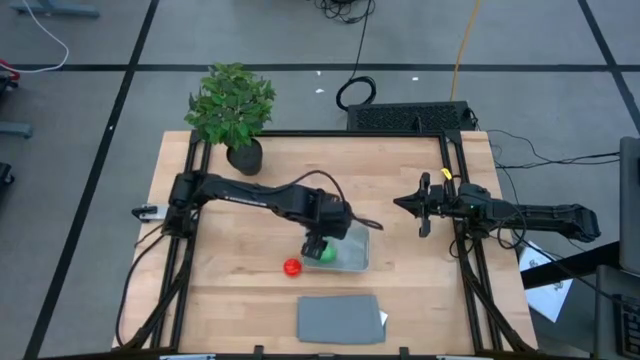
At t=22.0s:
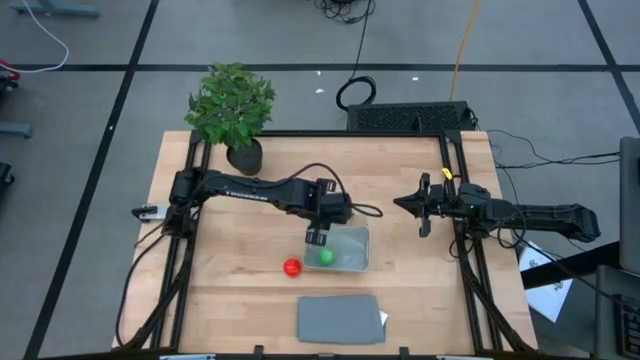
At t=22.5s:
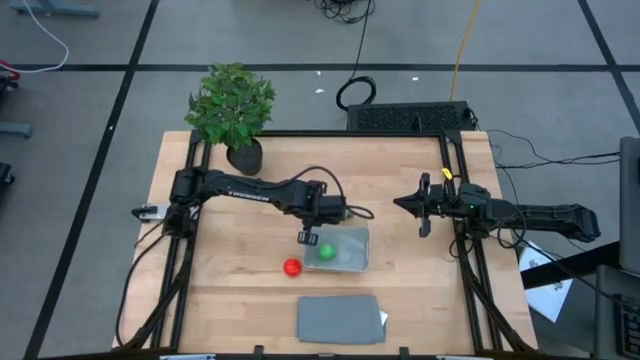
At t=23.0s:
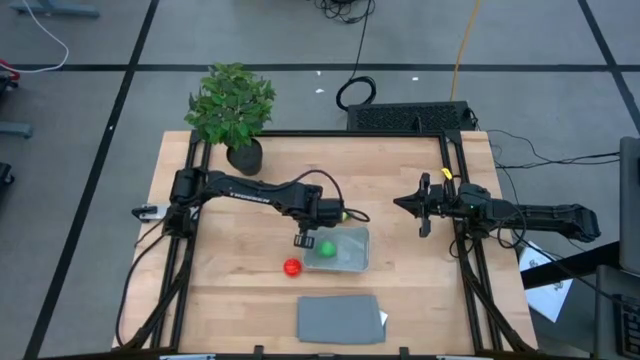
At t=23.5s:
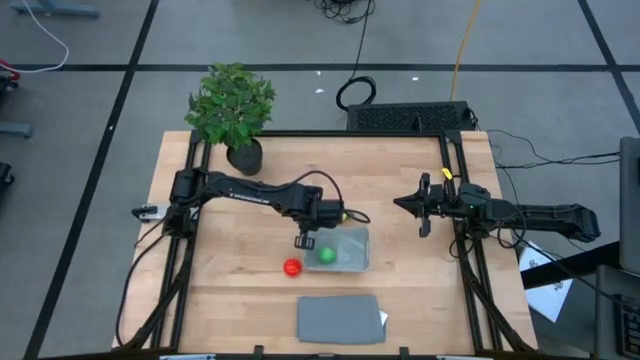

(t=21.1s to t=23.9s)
Task: Pick and placing Produce into tupperware
Adjust the gray bin

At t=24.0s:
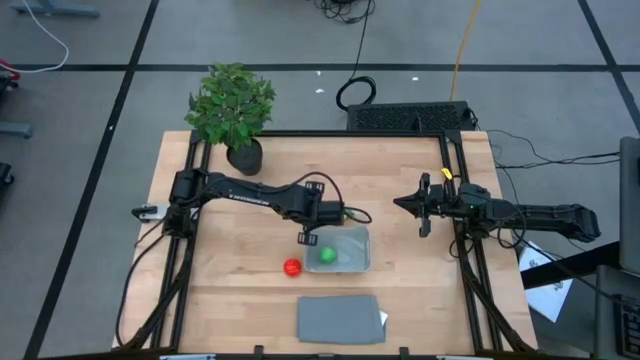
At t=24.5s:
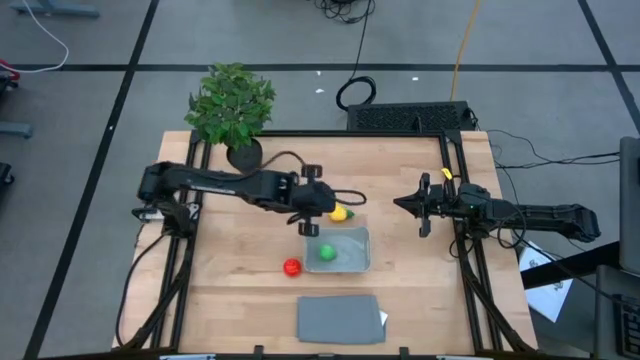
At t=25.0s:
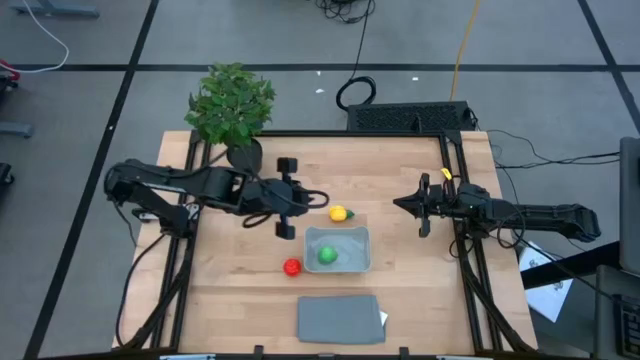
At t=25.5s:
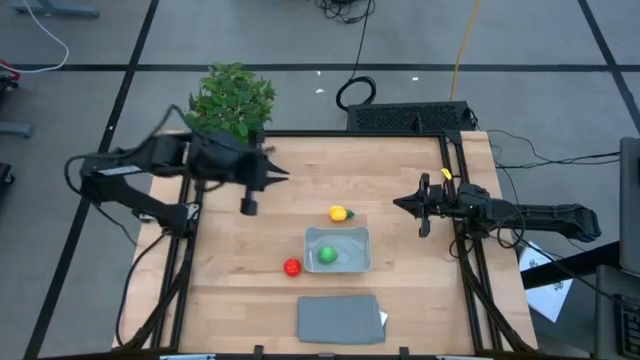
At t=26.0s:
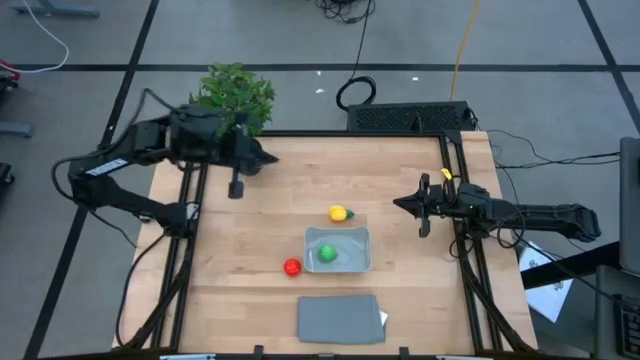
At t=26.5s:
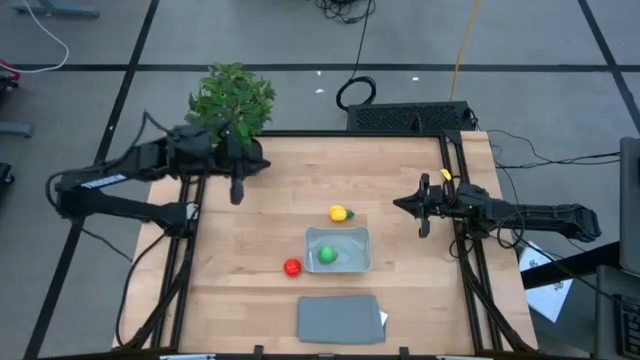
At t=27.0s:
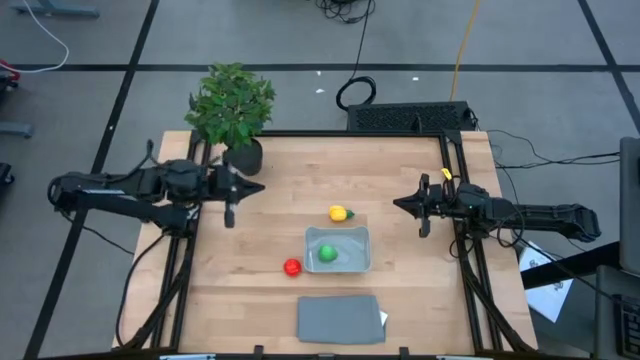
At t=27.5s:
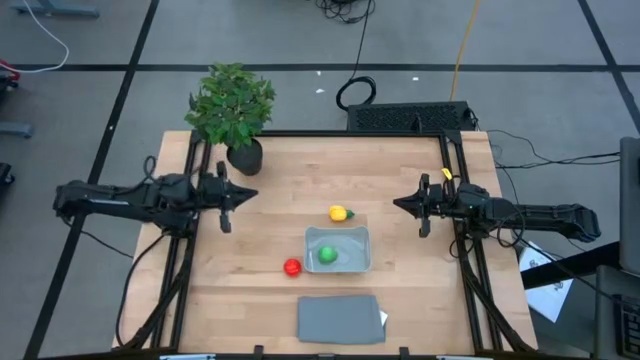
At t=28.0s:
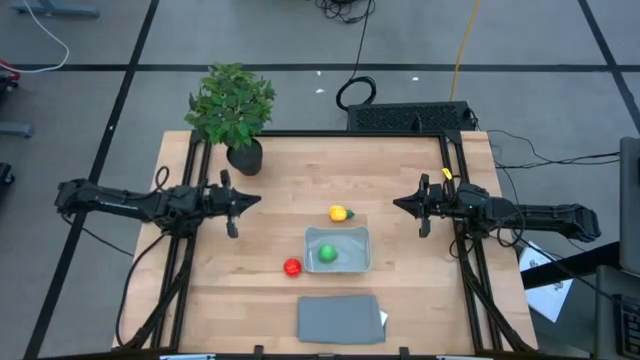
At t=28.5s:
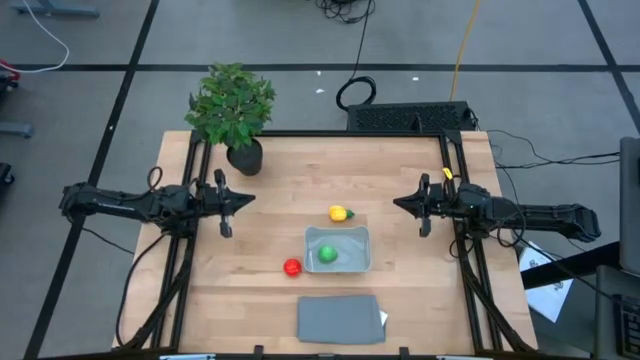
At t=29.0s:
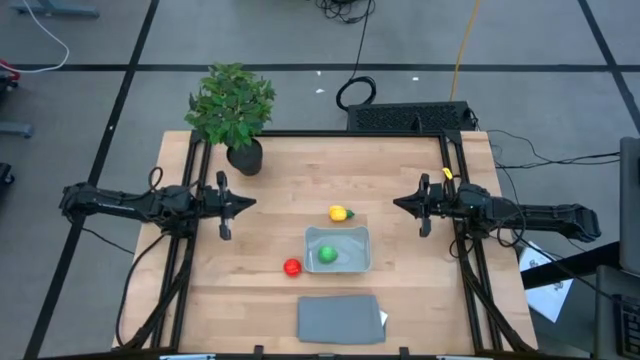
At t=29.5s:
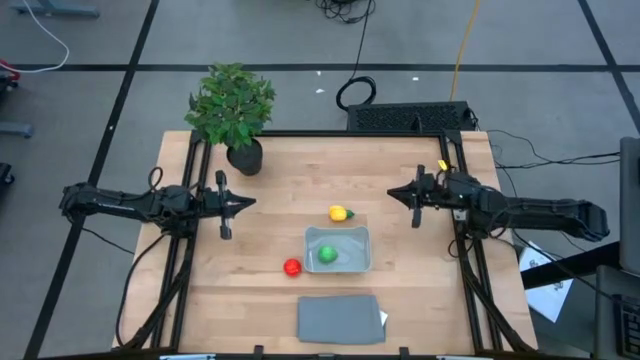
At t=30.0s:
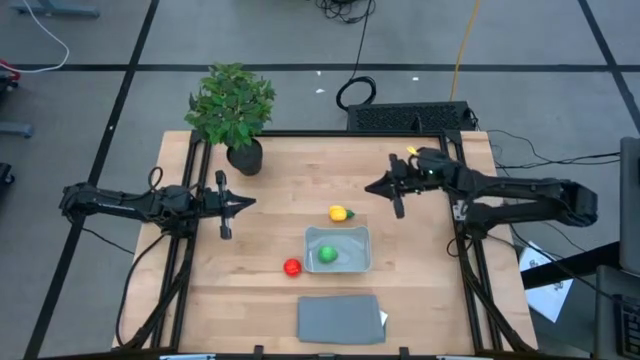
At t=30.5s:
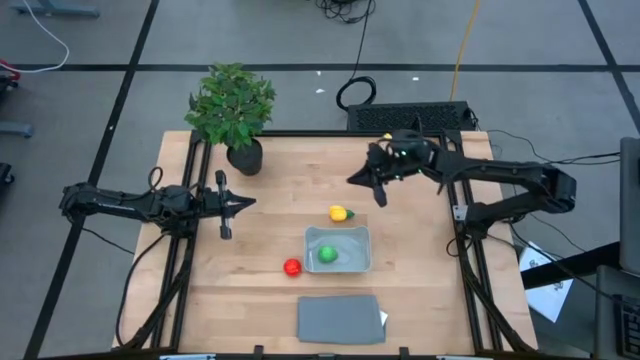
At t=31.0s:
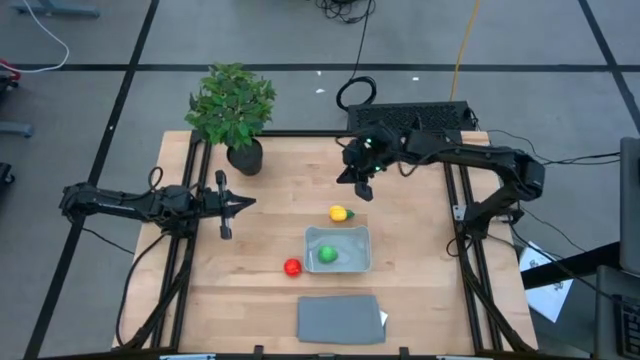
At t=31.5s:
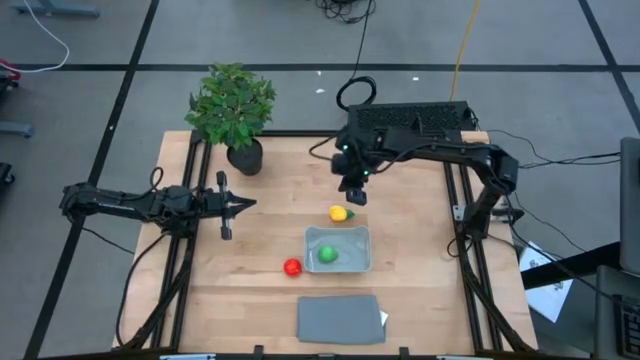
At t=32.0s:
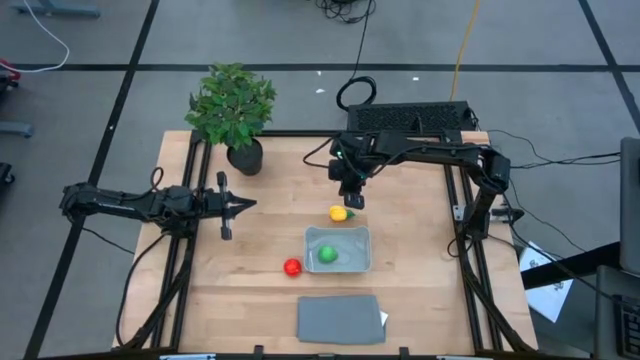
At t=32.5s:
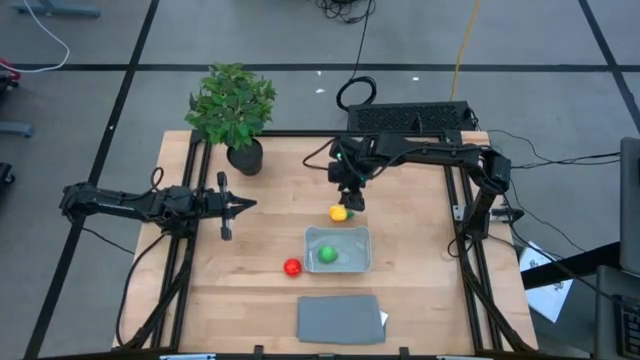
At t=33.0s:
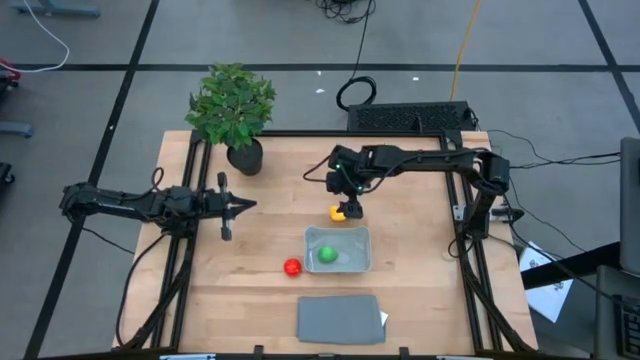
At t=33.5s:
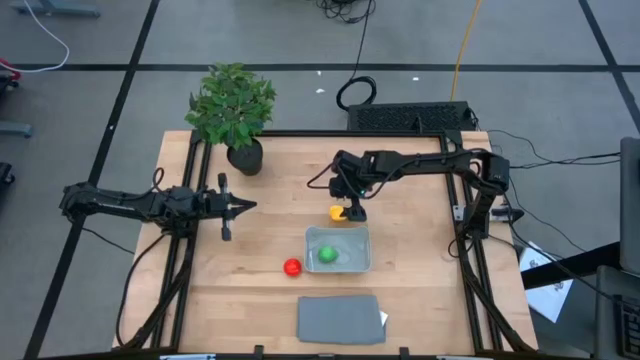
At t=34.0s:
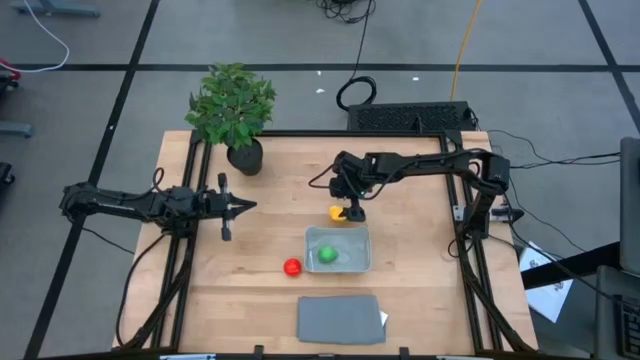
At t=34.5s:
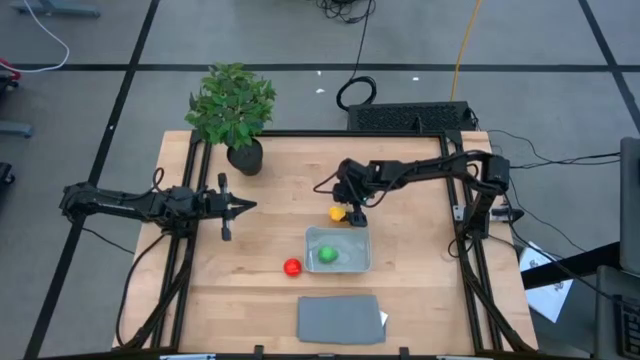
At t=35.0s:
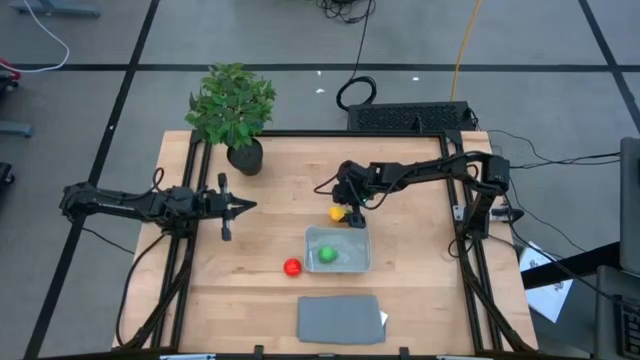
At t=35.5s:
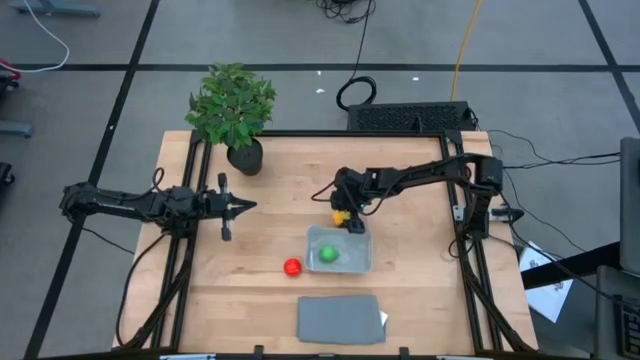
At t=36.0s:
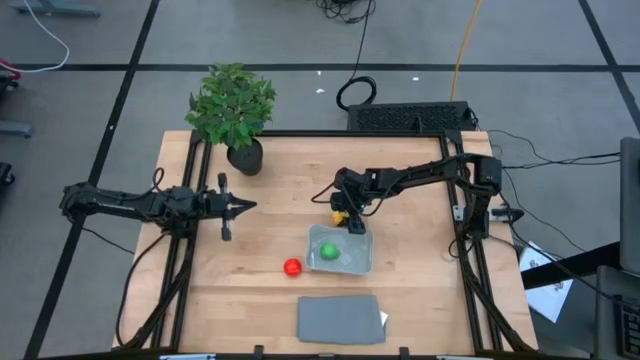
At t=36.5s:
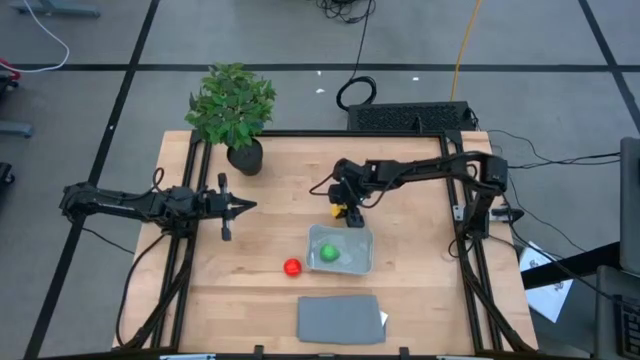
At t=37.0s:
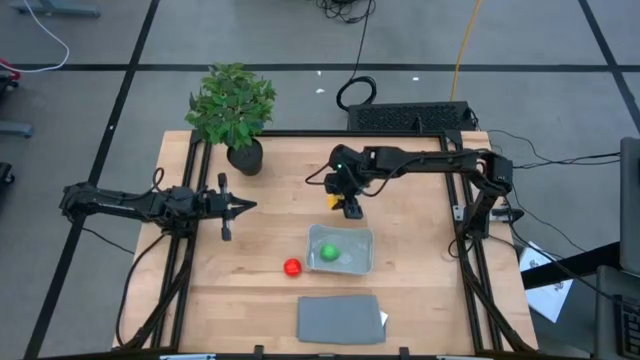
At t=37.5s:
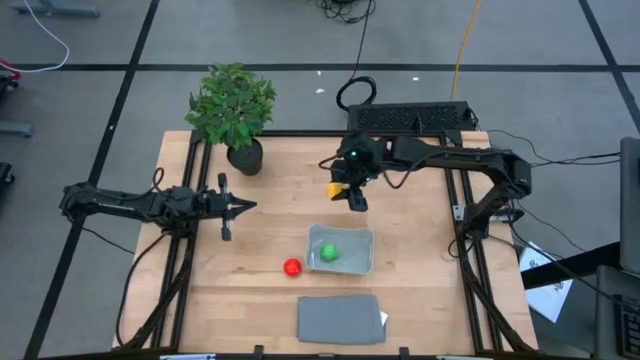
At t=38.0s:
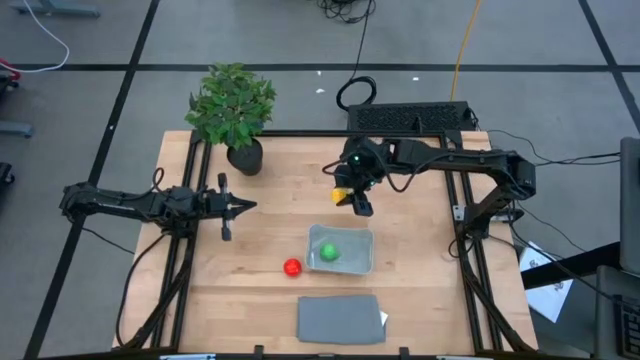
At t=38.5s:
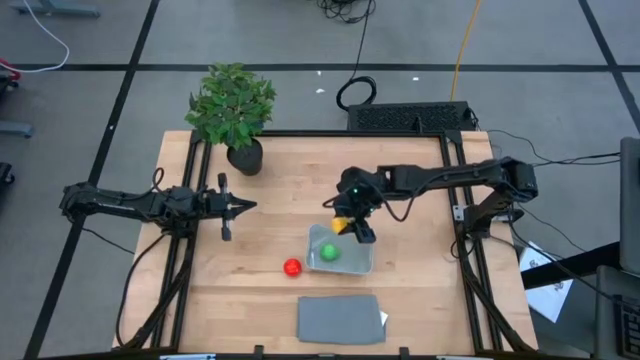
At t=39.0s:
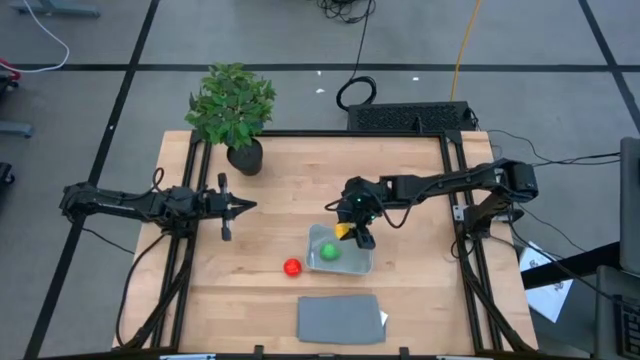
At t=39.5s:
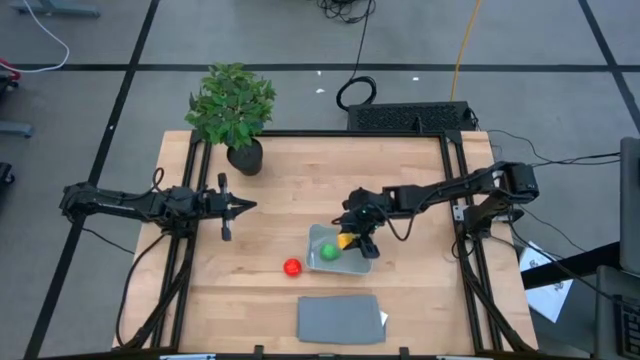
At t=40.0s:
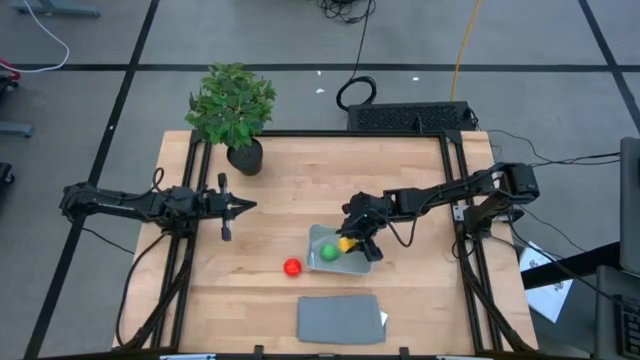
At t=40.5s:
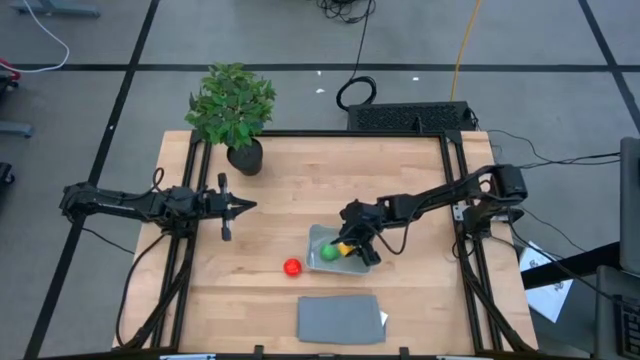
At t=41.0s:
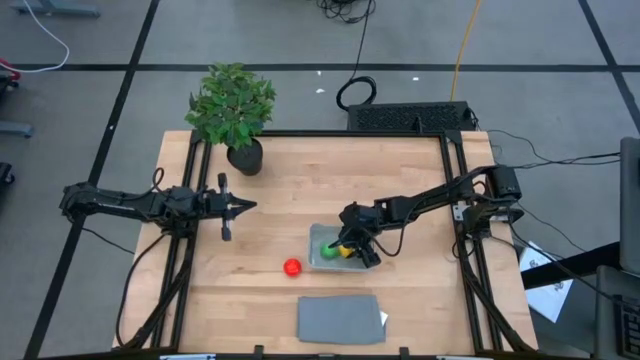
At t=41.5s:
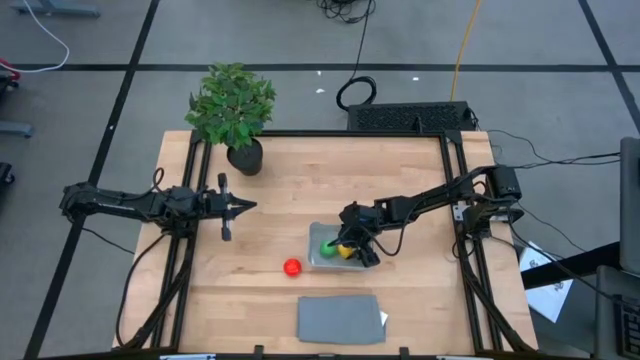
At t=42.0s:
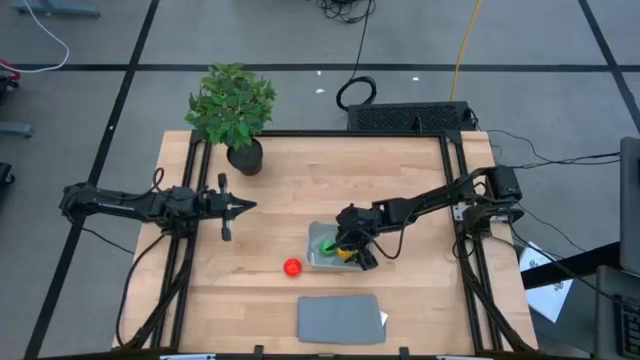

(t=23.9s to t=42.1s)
Put the yellow pineapple into the gray bin
